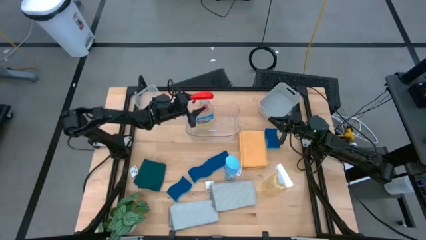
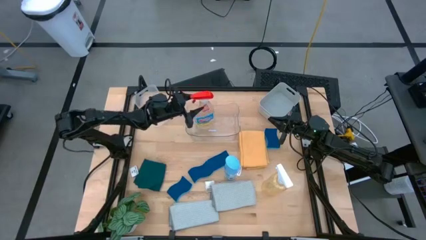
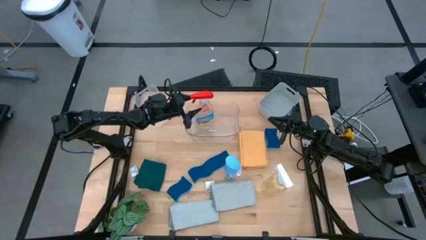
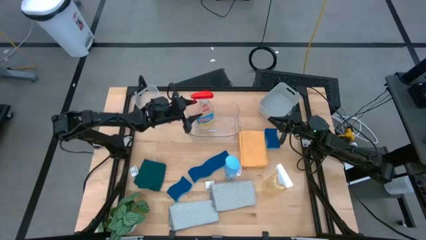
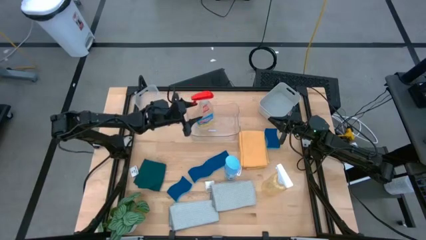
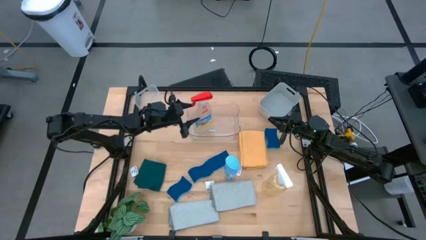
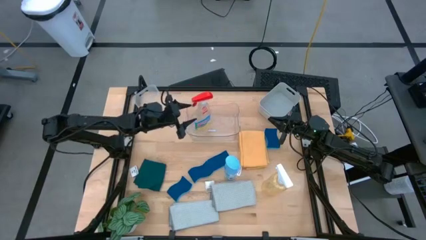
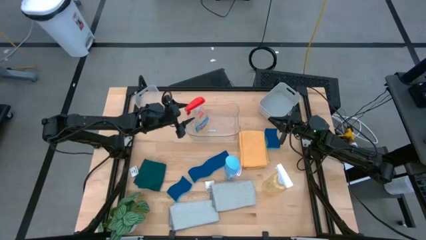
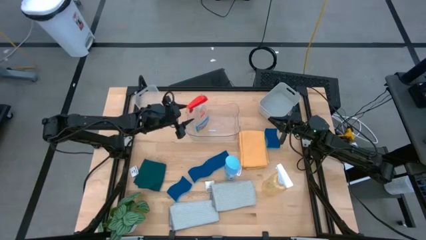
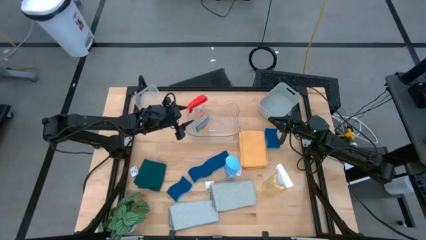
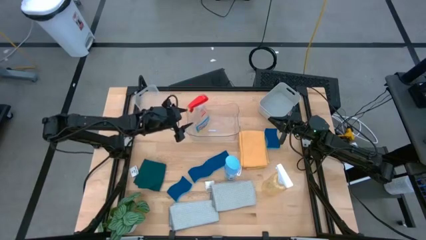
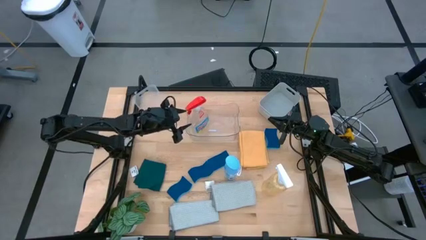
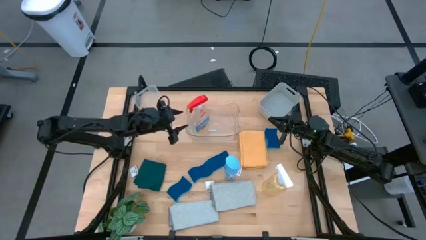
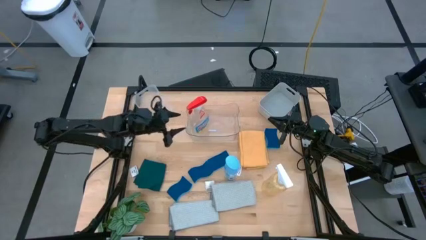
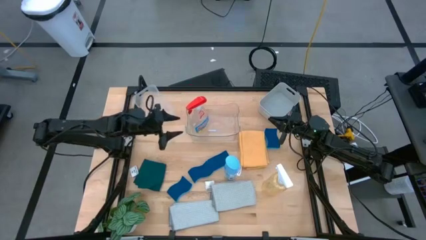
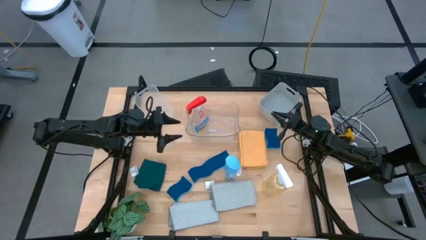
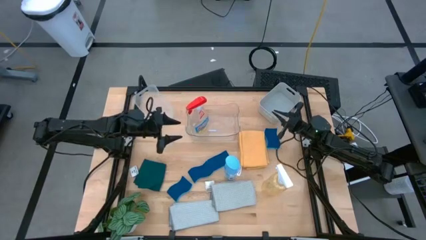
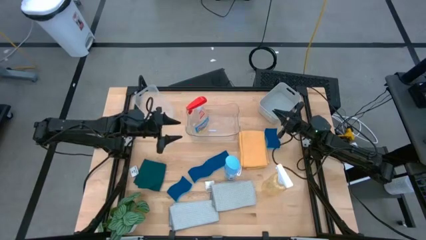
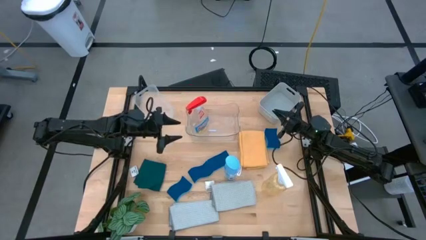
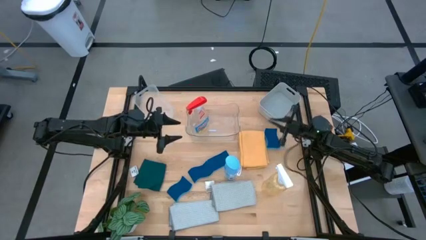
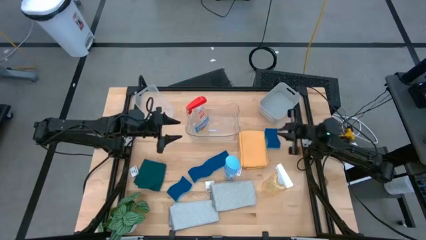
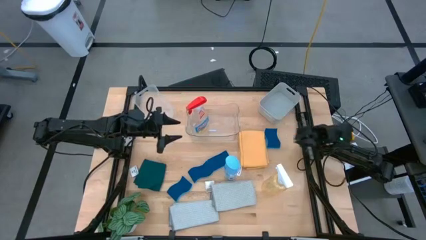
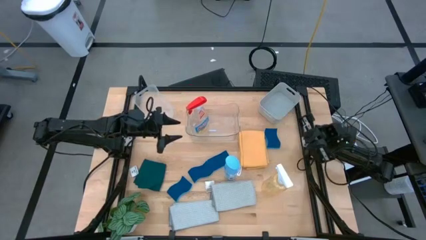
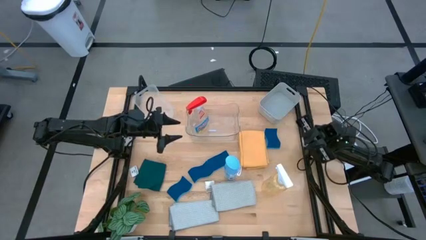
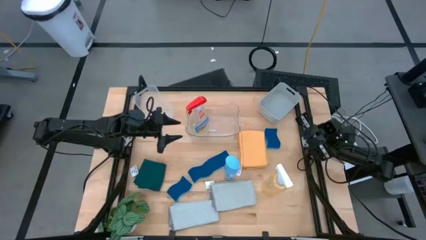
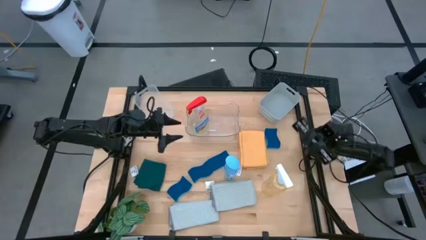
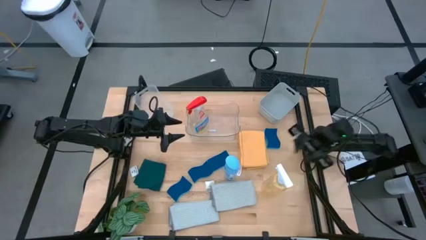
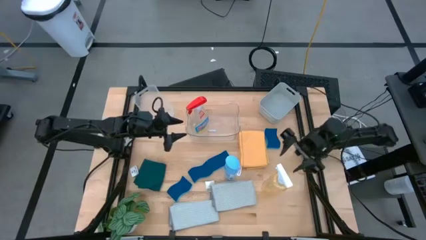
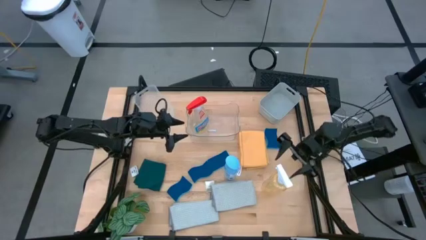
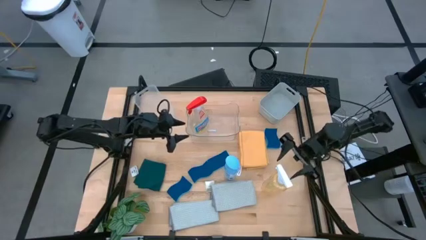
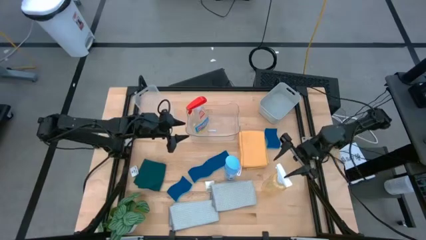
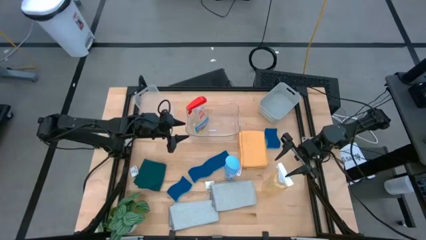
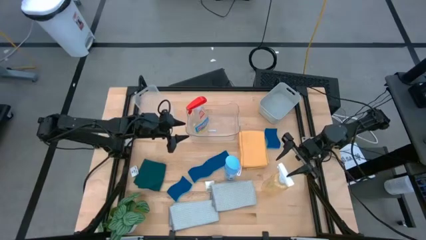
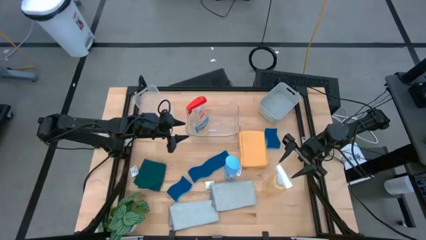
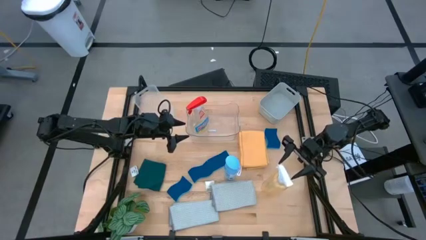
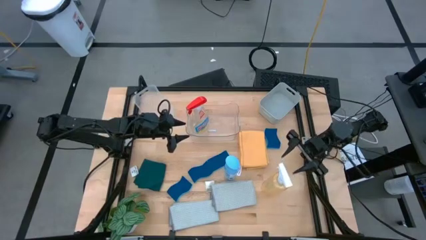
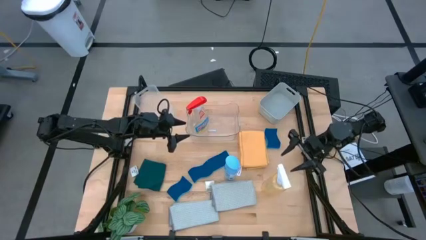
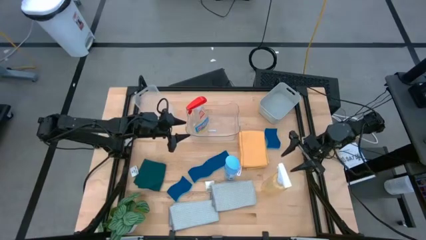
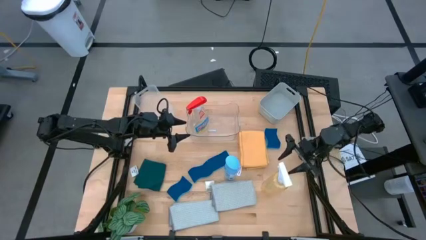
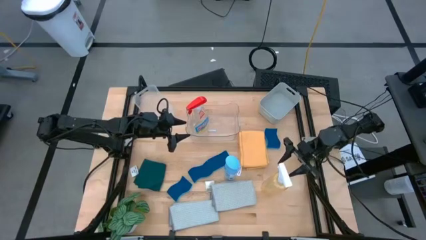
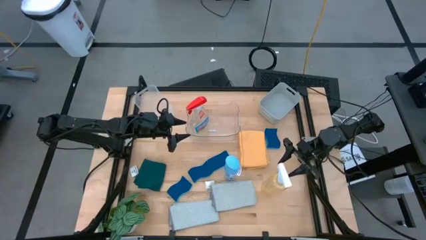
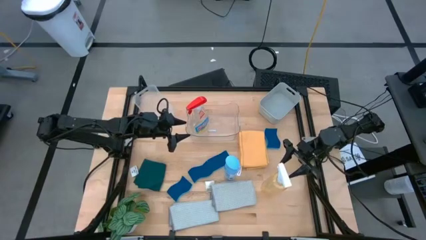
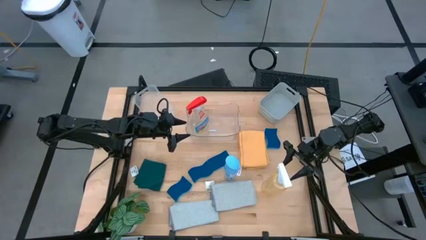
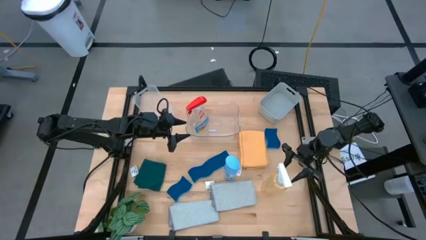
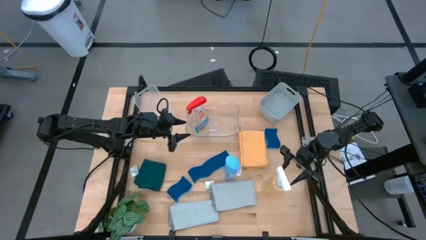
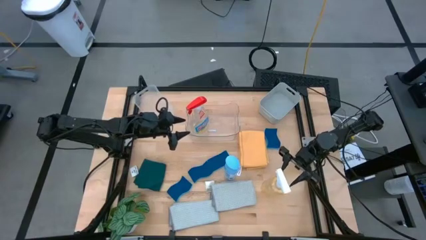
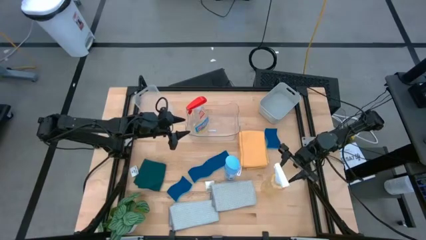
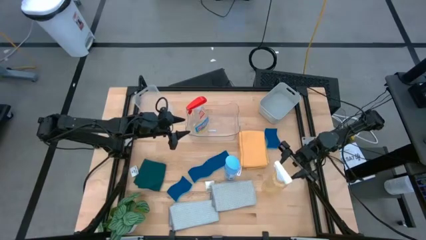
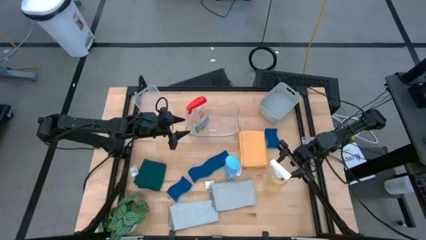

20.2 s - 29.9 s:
Task: Pick & Place Kitchen Items
Put the yellow sprayer bottle into the transparent bin

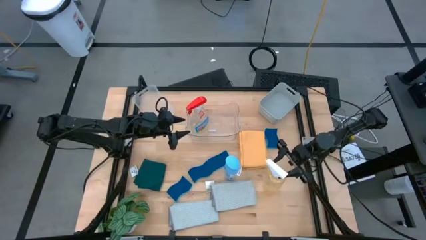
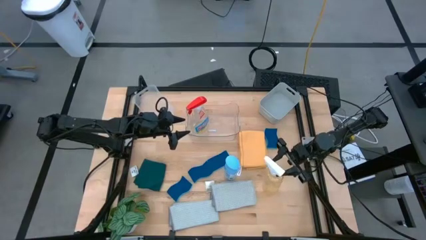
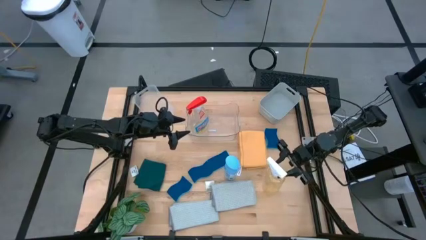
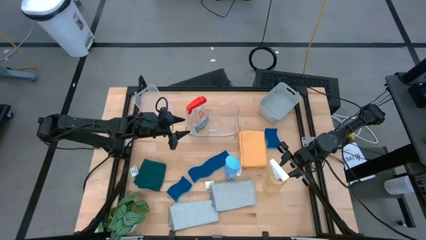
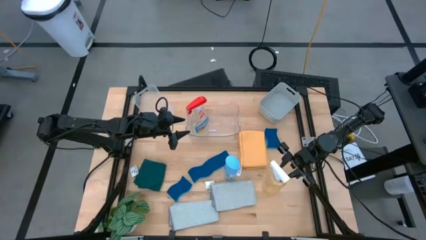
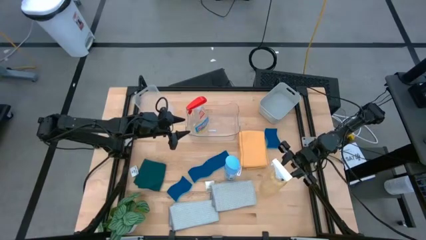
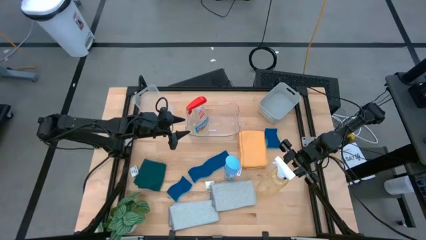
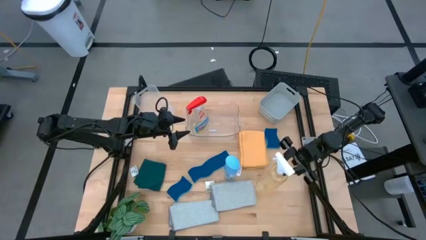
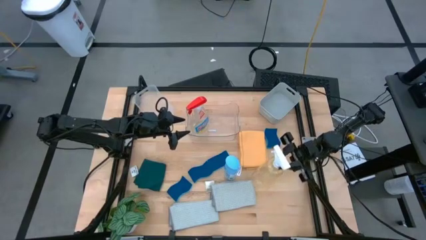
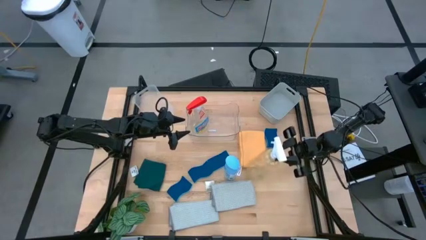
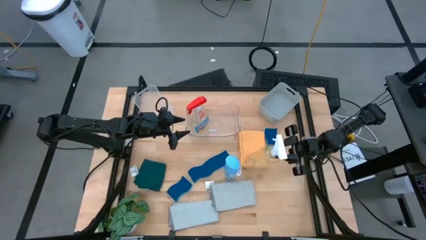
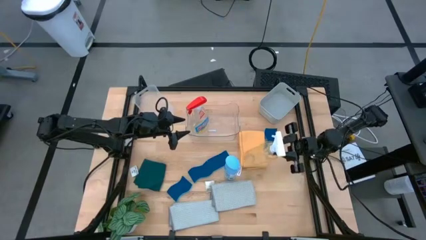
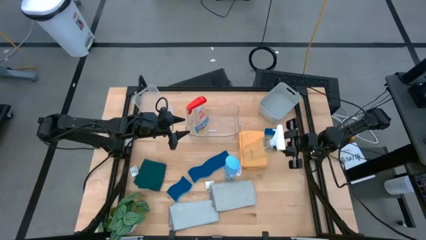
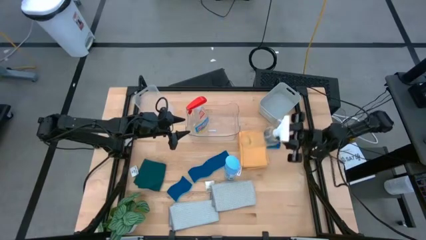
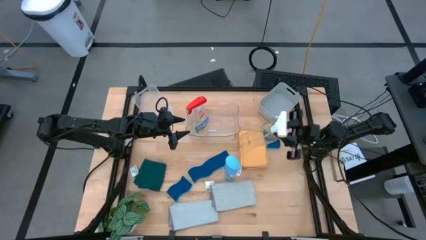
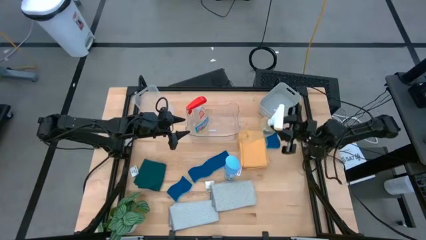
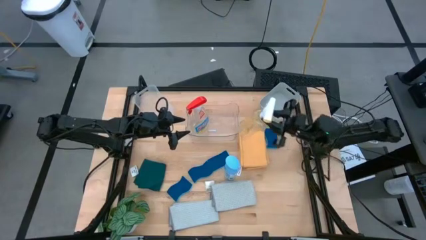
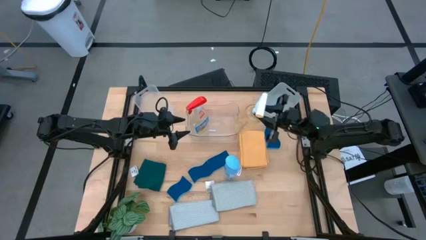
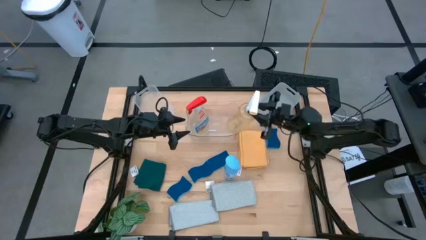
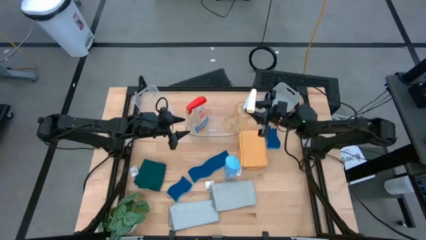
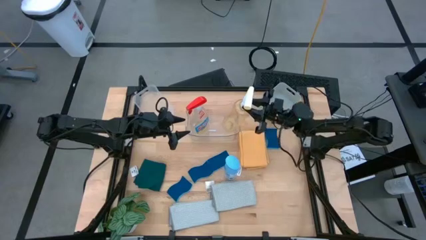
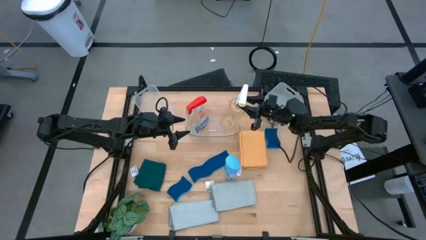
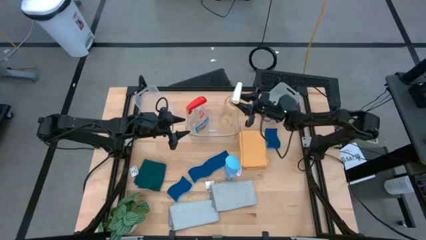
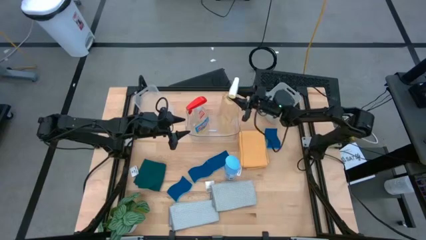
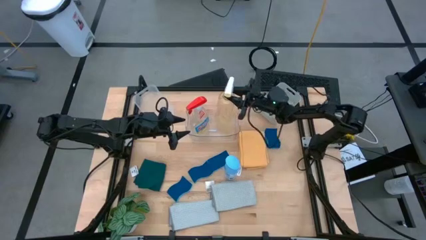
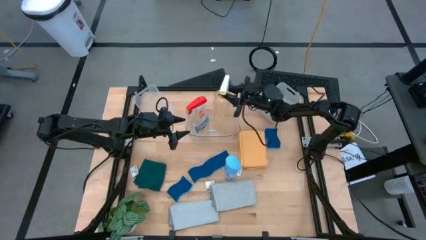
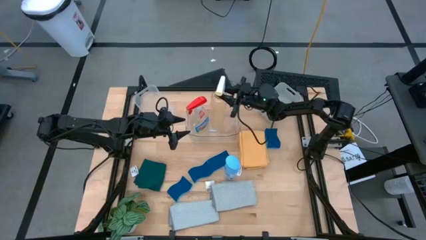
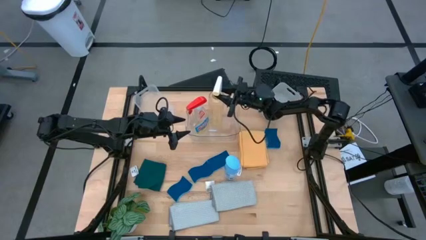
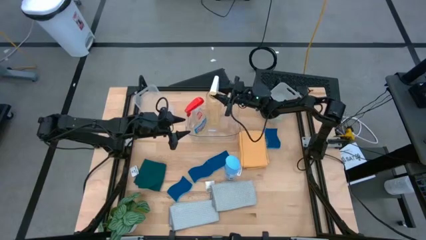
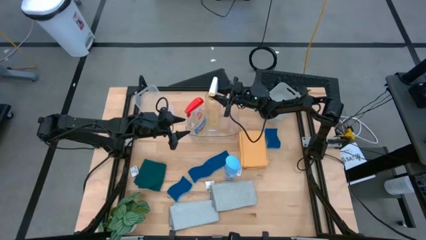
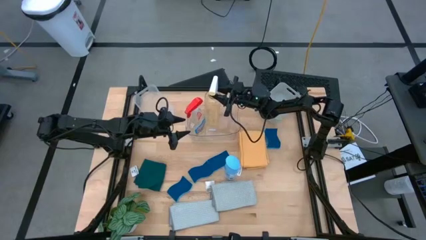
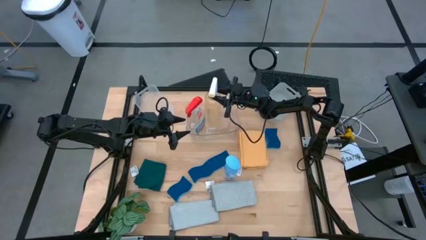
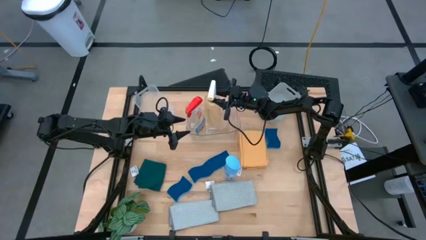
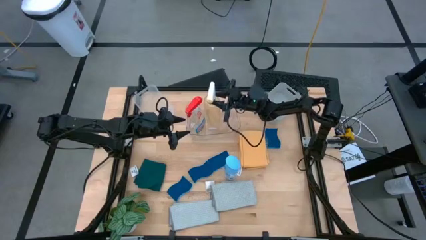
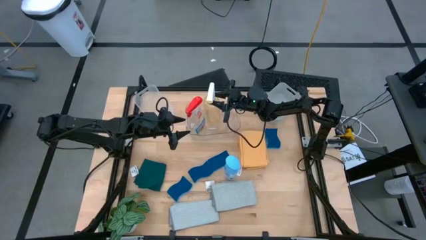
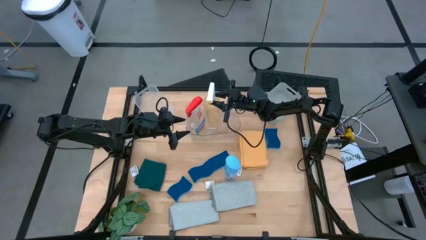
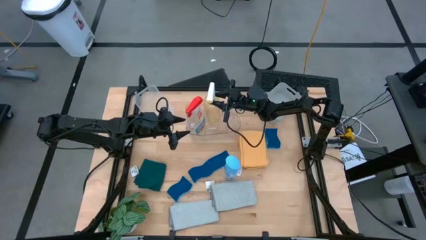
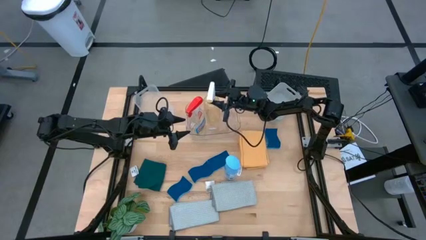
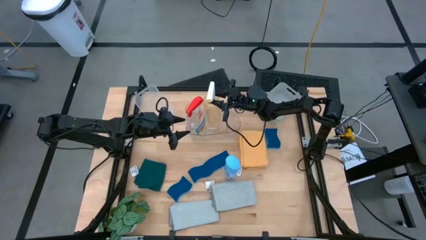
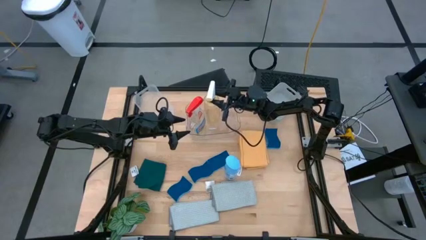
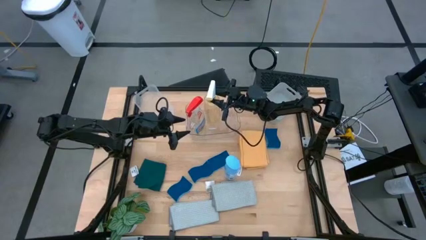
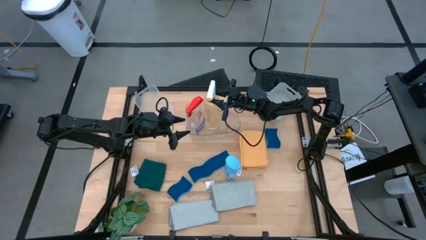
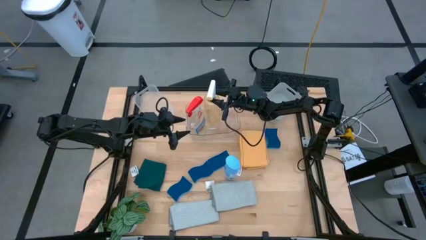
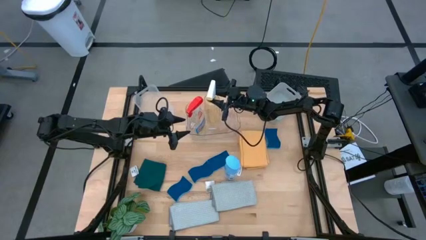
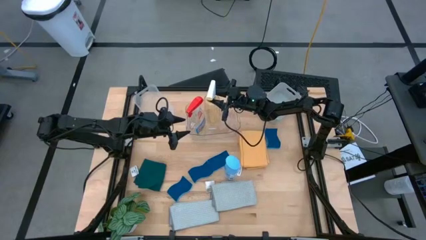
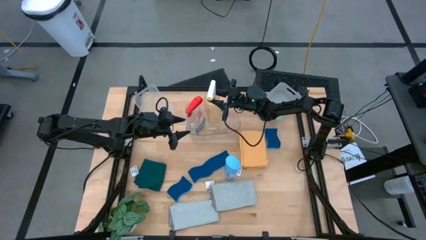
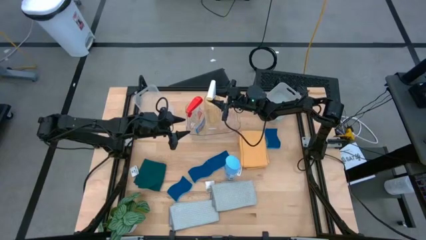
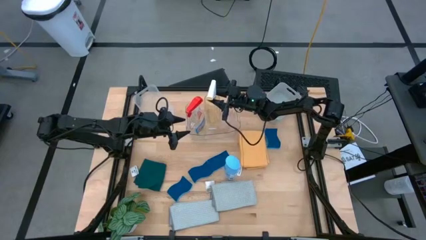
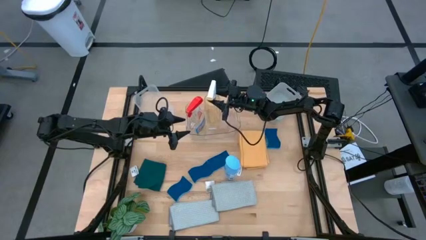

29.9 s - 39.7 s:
Put the yellow sprayer bottle into the transparent bin
